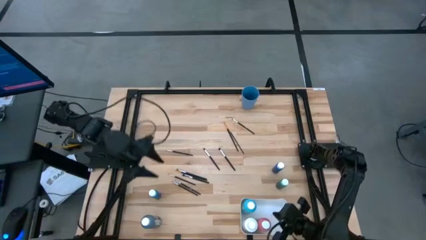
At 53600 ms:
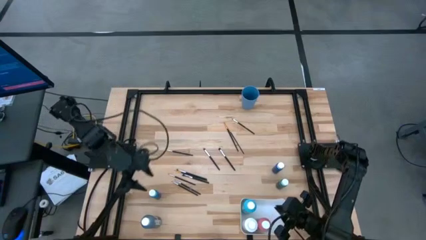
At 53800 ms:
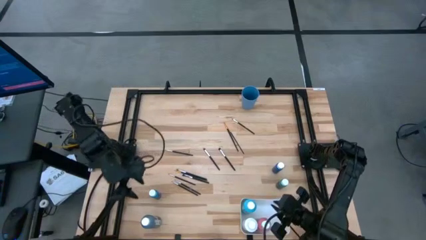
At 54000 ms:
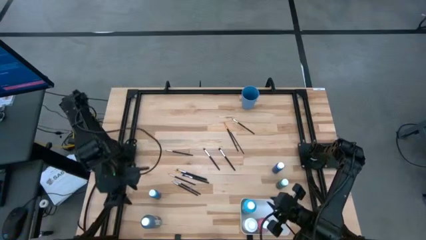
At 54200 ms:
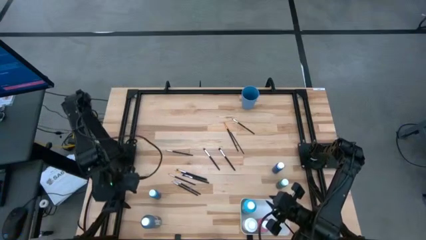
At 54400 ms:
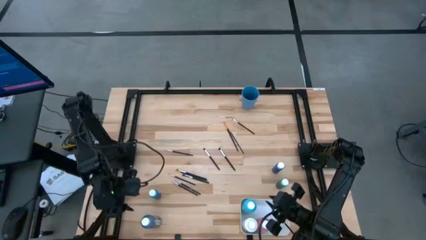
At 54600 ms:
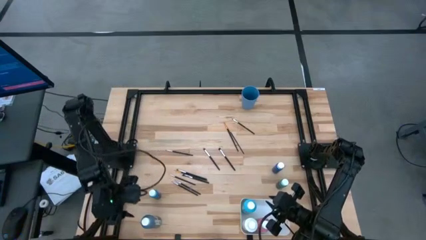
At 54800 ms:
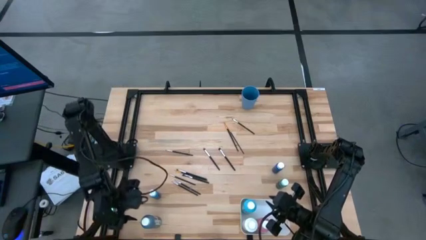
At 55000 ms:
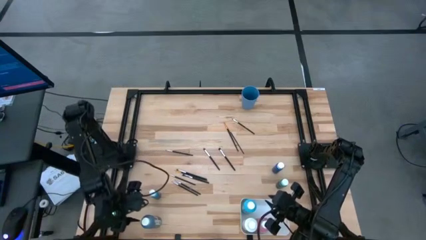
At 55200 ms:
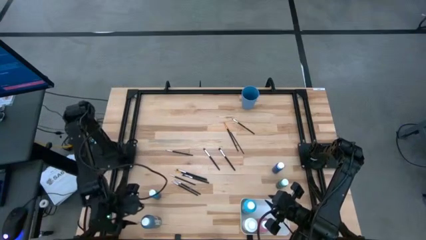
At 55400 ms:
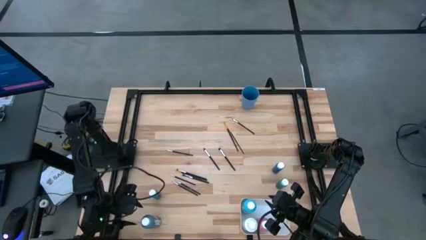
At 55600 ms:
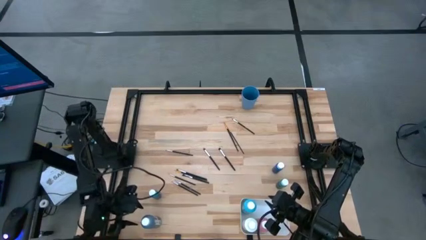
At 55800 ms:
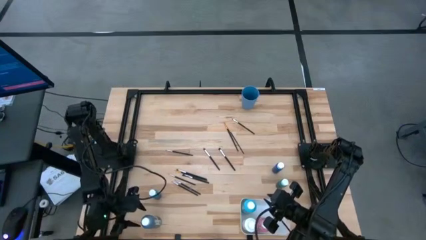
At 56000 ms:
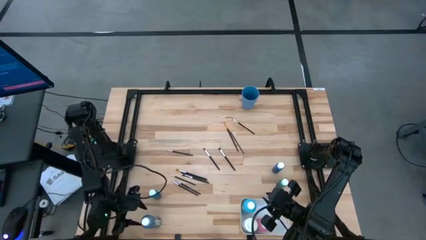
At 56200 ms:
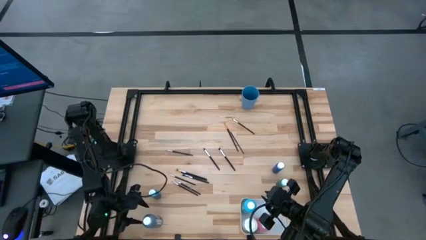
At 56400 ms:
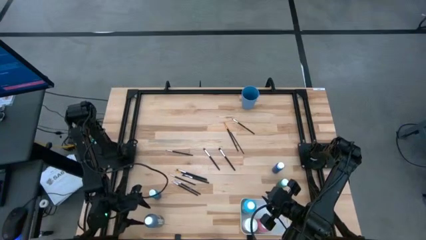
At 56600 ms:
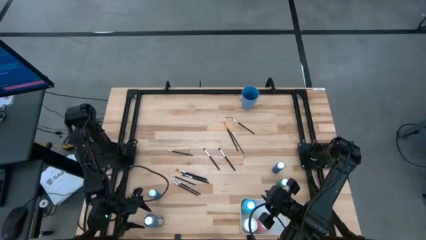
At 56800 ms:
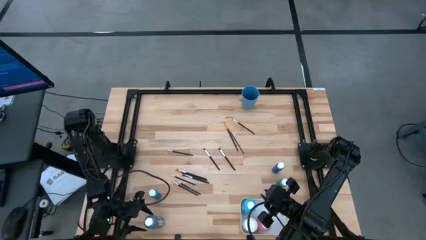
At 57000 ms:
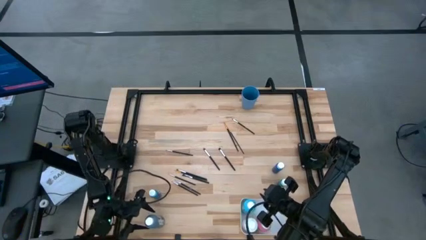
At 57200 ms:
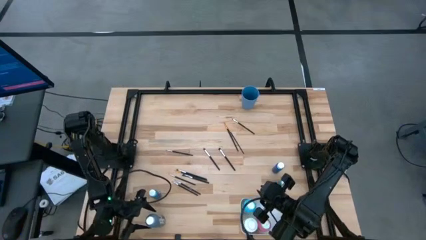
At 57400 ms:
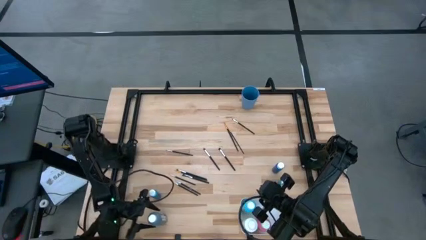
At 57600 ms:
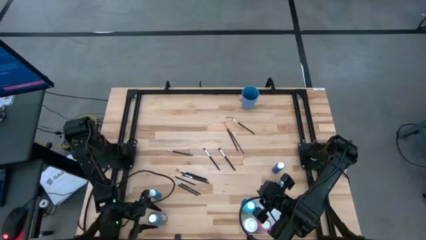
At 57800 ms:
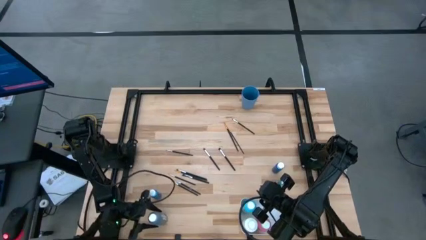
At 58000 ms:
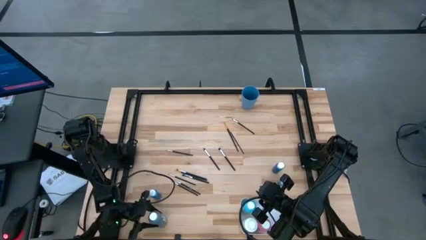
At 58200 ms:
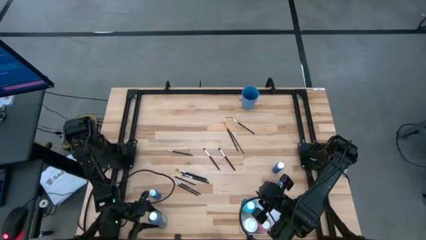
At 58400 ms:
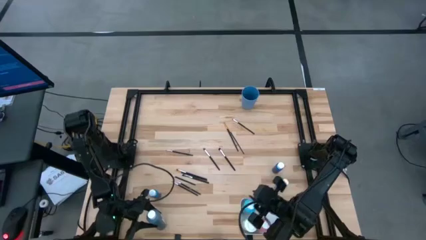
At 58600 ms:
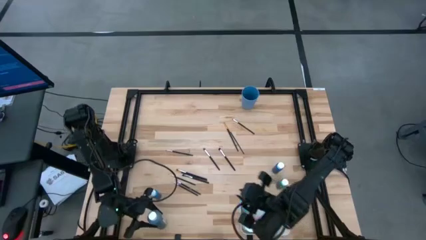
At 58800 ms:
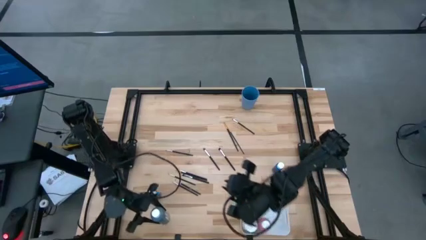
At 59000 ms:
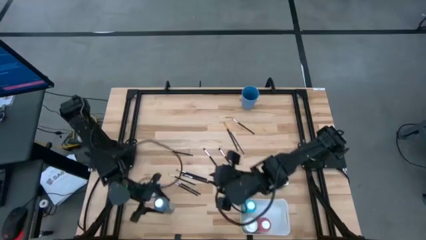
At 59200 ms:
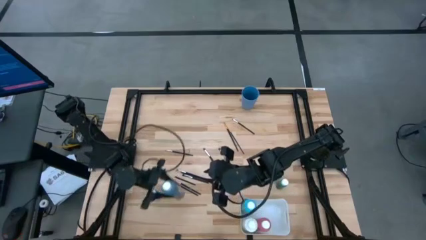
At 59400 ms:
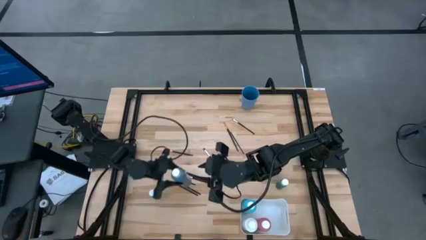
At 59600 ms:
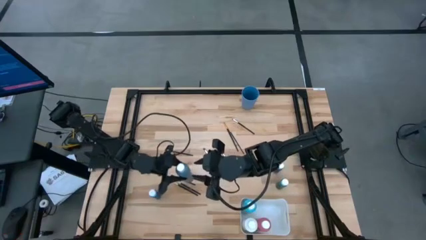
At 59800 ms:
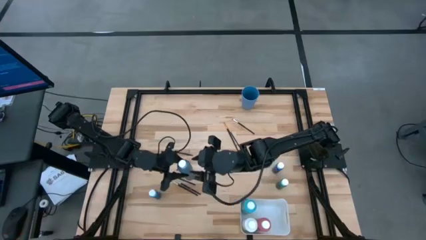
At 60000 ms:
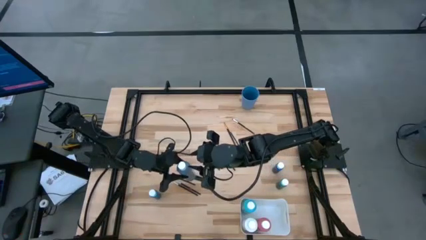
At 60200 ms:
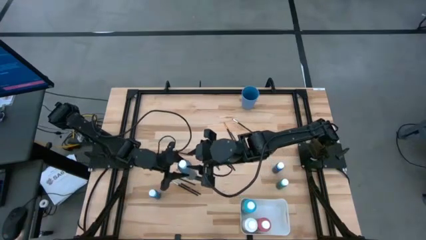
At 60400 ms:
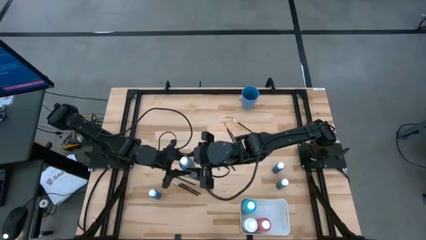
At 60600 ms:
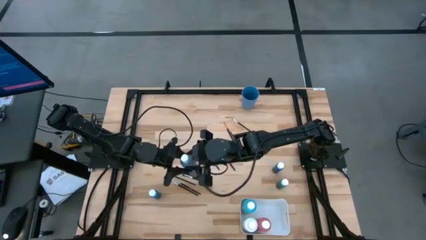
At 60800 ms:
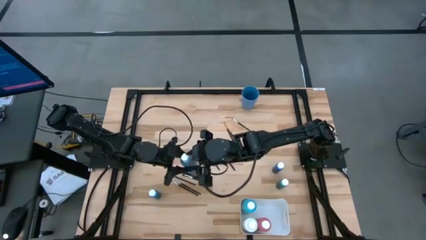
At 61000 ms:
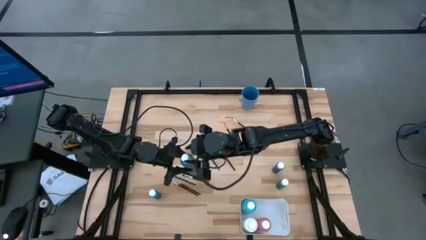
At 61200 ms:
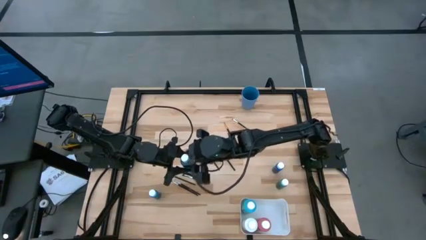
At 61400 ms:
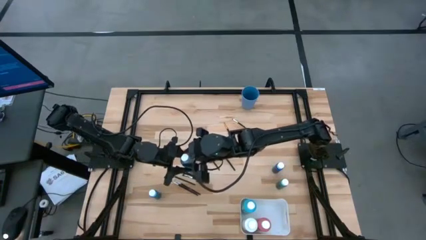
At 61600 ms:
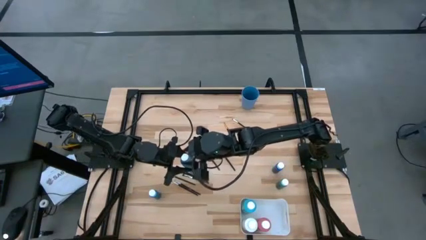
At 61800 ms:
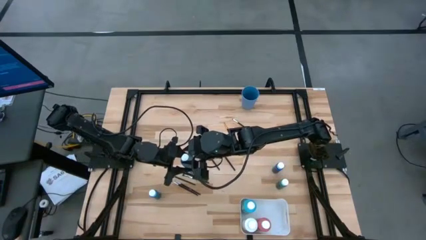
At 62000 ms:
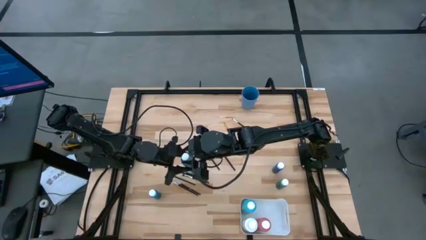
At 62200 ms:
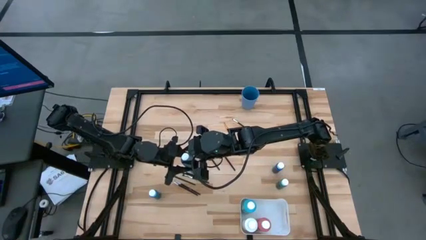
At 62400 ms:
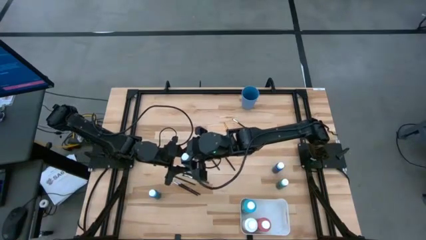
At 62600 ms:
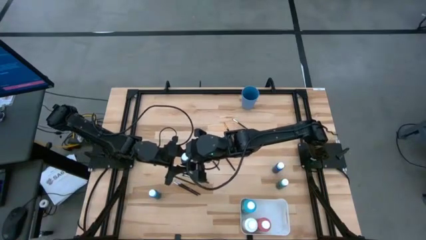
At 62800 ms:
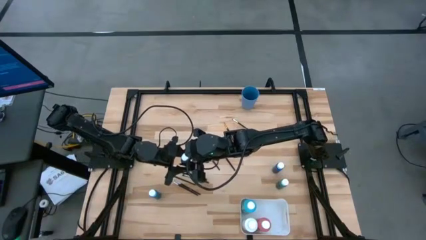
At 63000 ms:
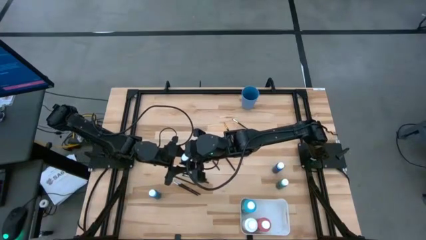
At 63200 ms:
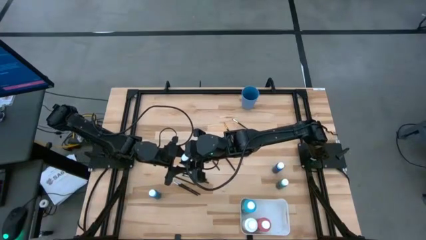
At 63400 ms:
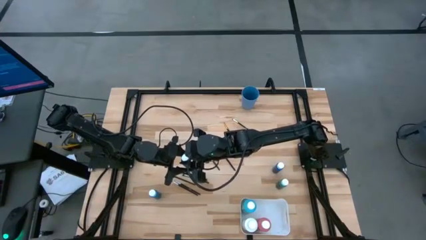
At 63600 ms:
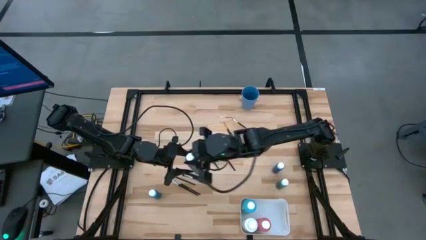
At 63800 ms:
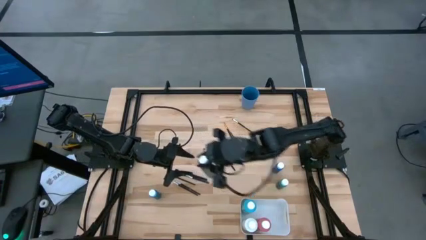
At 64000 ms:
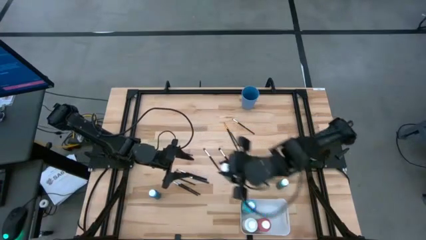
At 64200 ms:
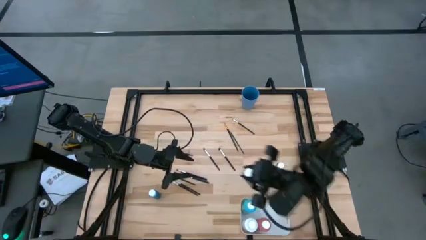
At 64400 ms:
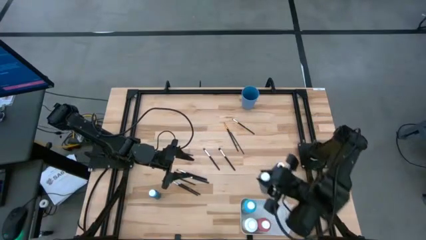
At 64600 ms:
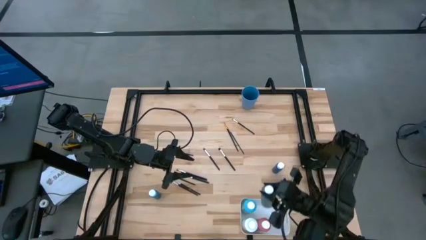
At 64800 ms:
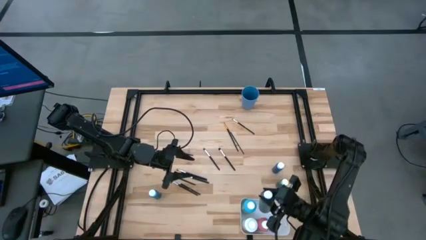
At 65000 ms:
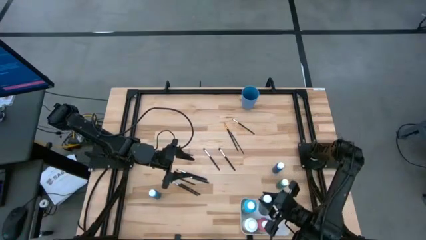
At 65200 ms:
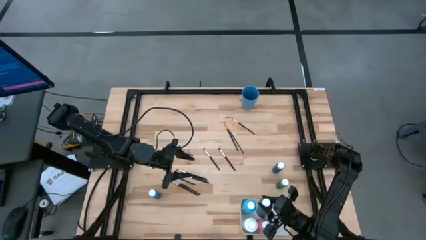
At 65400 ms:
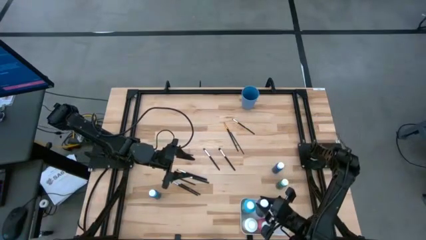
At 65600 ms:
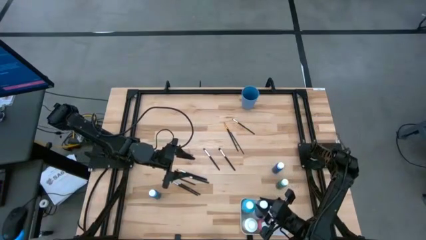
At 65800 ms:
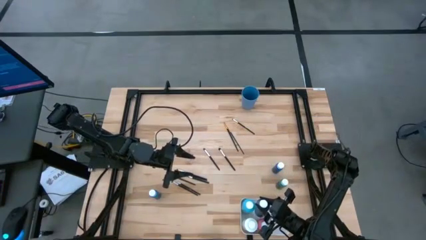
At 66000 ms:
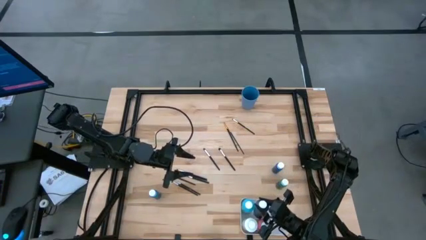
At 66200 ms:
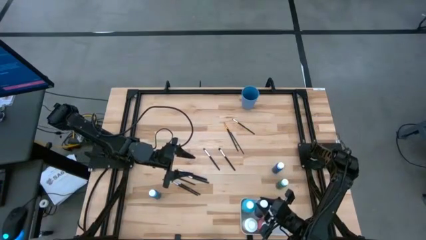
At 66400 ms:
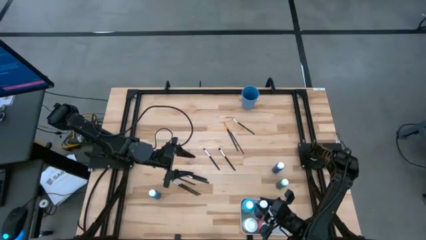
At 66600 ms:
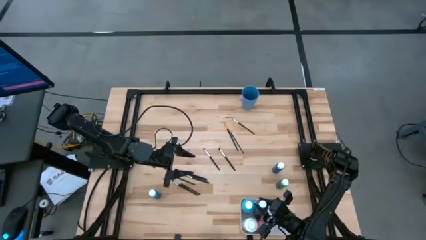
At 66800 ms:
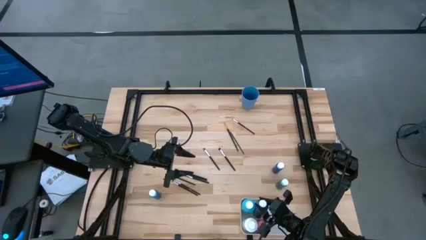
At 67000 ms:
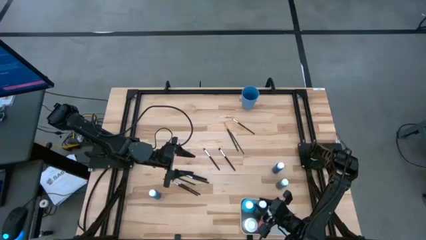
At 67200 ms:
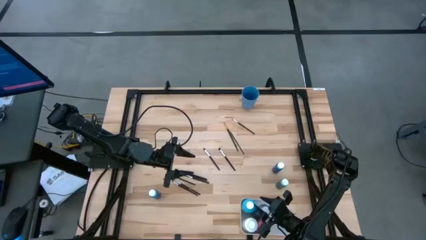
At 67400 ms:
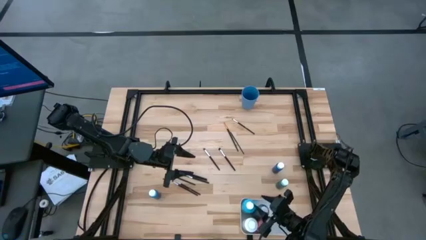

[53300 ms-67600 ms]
Task: Pick & Place Paint Supplies
Put the large blue paint bottle into the white bin

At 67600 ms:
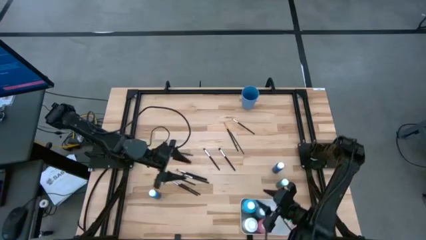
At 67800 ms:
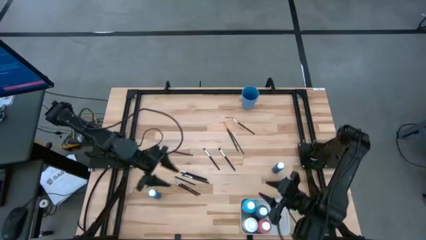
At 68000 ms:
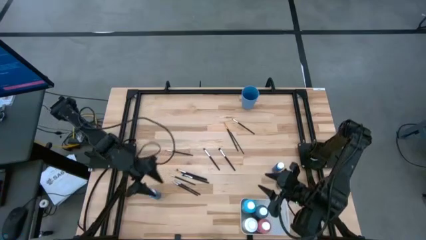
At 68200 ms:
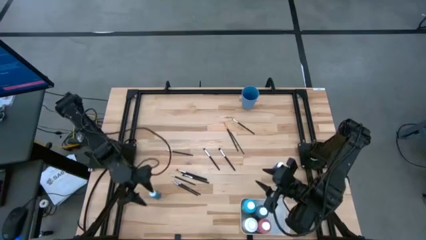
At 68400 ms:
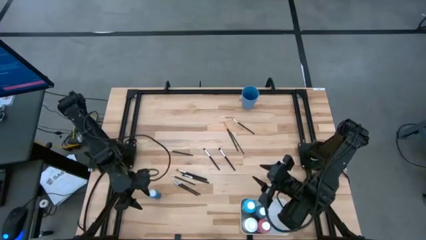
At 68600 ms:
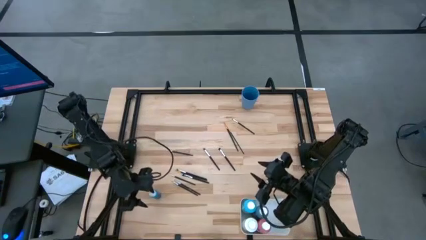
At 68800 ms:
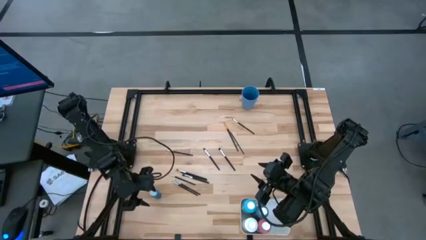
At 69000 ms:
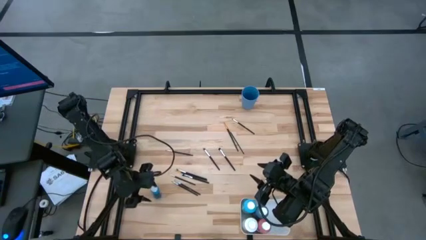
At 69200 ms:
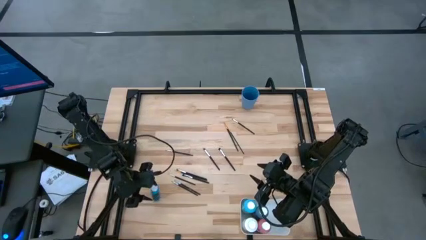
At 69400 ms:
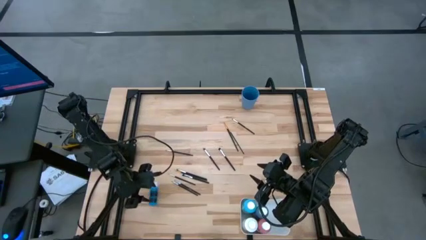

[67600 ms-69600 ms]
Put the left small blue paint bottle into the white bin
